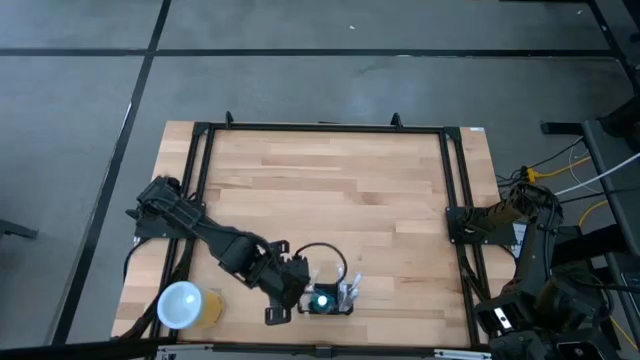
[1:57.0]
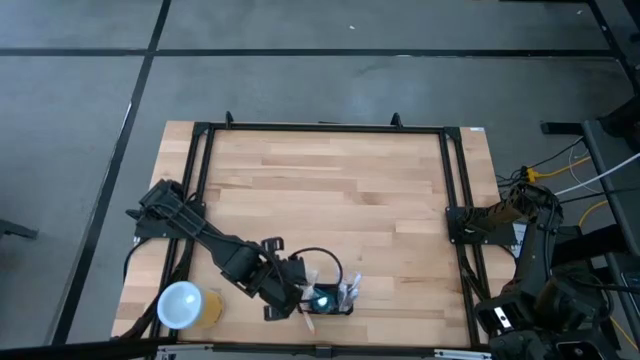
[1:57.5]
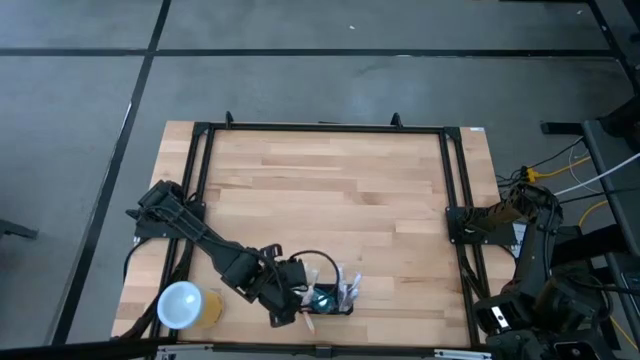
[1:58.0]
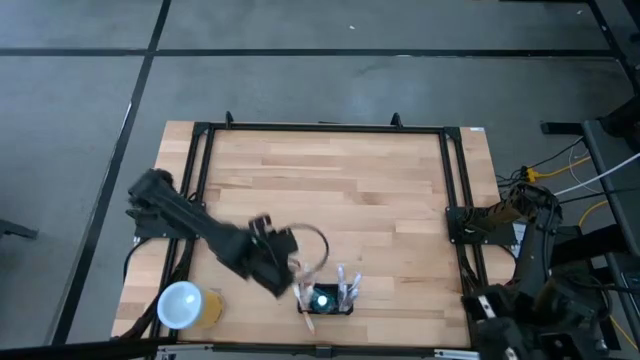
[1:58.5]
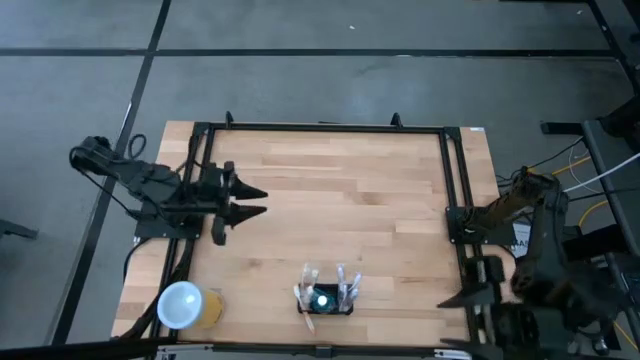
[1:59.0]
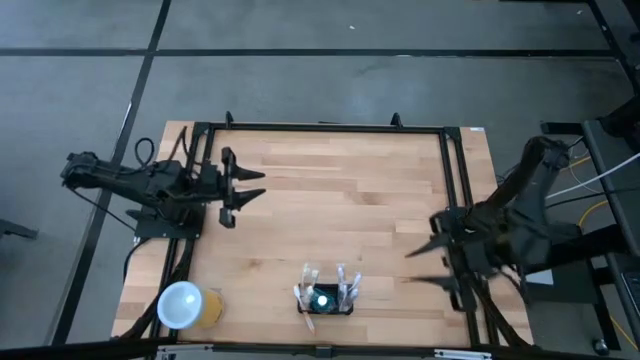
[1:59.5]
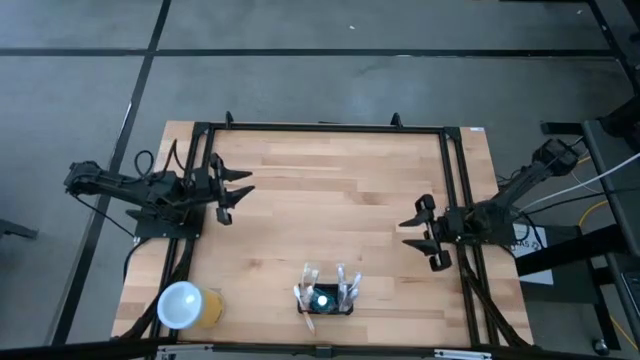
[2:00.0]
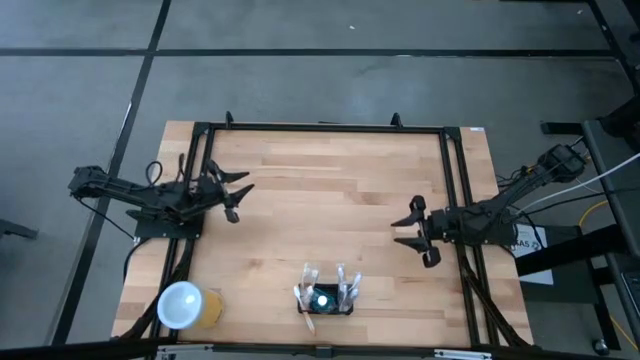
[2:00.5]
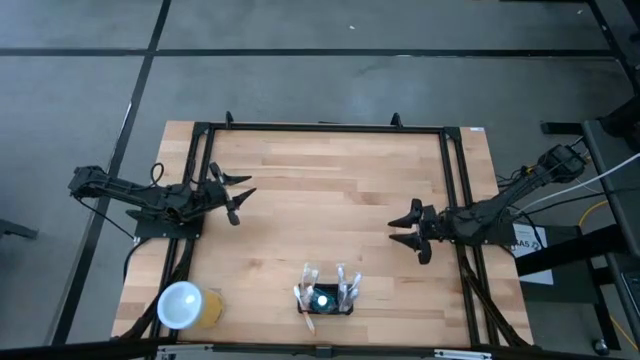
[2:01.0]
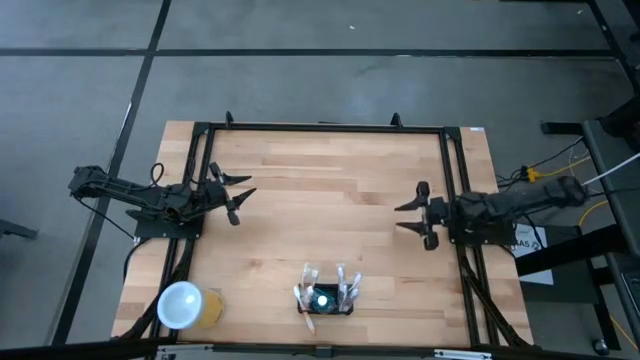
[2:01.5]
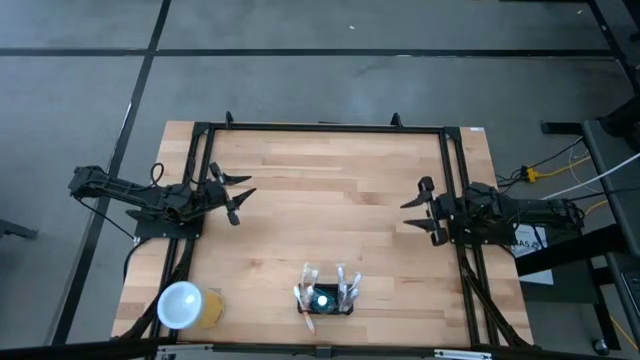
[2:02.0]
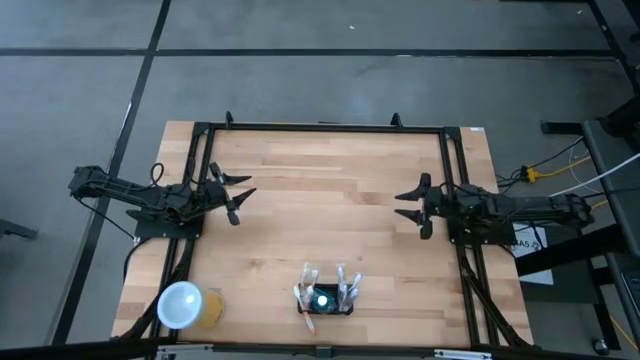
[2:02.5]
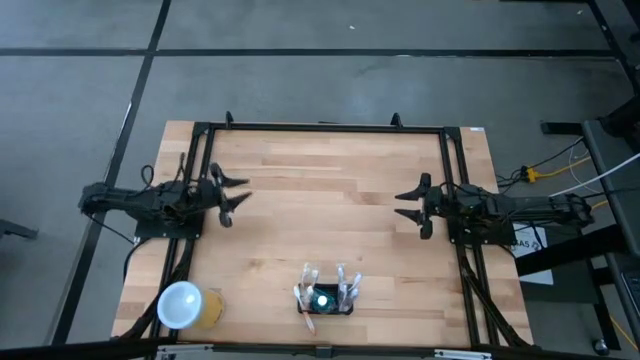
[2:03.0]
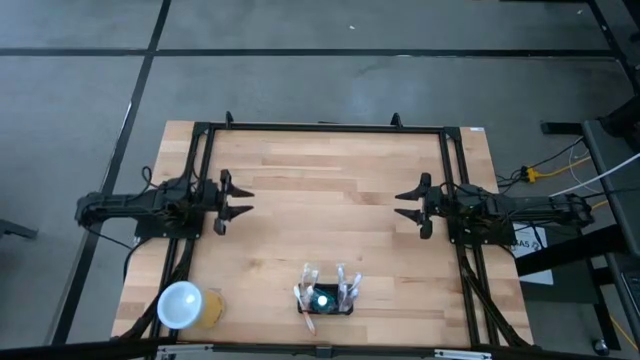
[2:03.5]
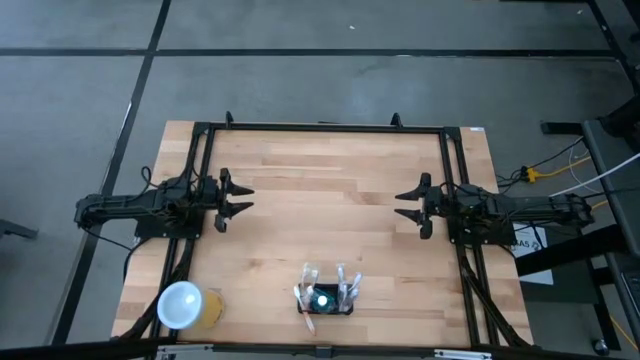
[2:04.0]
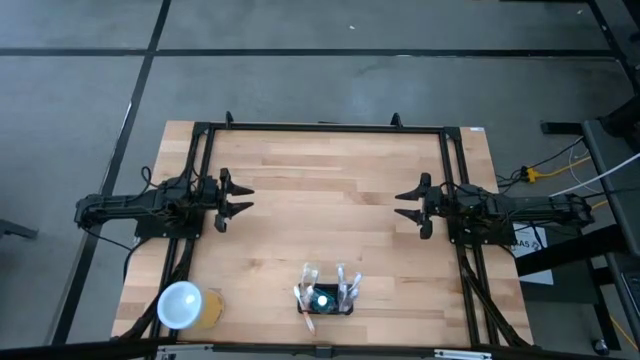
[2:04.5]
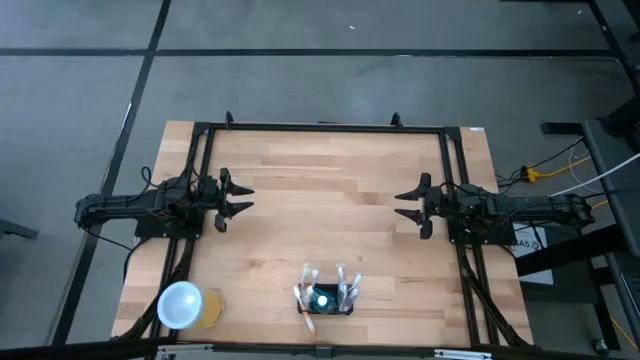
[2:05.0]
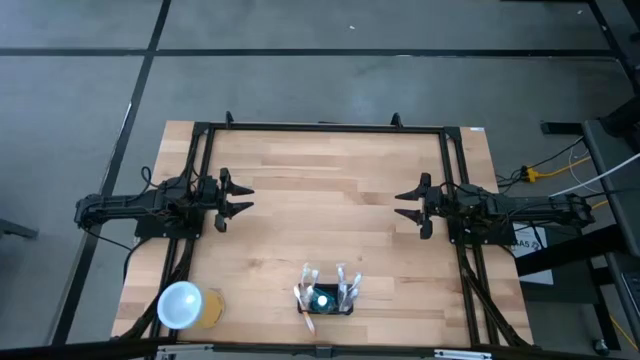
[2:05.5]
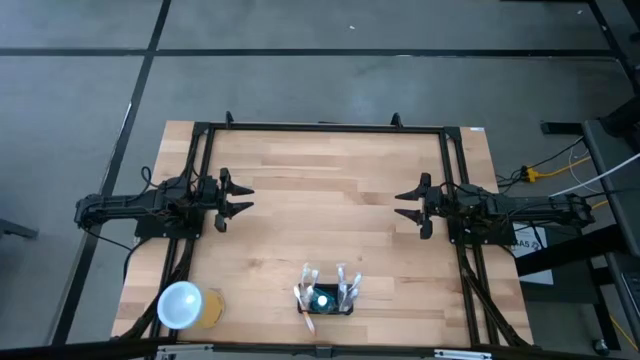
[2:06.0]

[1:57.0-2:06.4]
Task: Pick & Place toothbrushing station
Return to Home Position

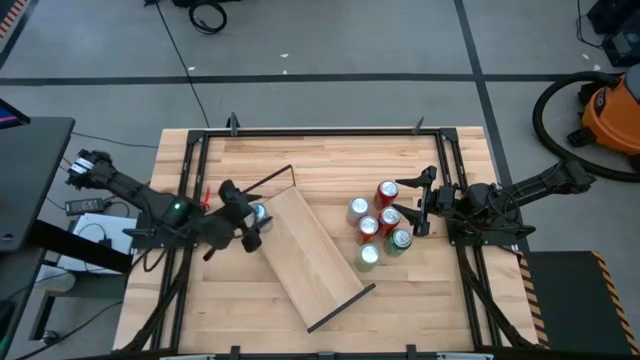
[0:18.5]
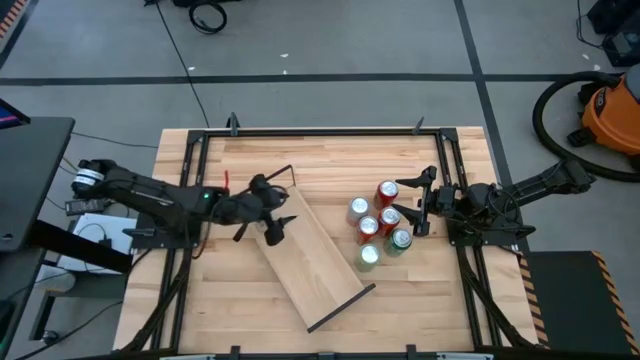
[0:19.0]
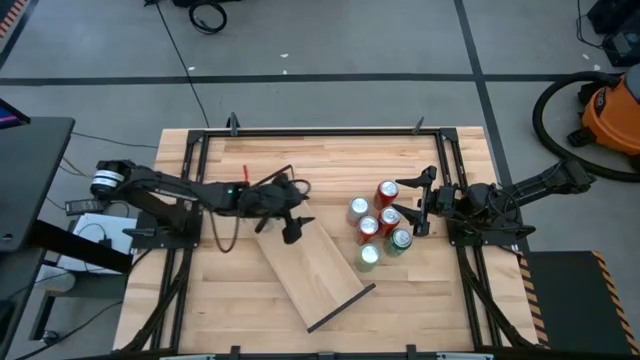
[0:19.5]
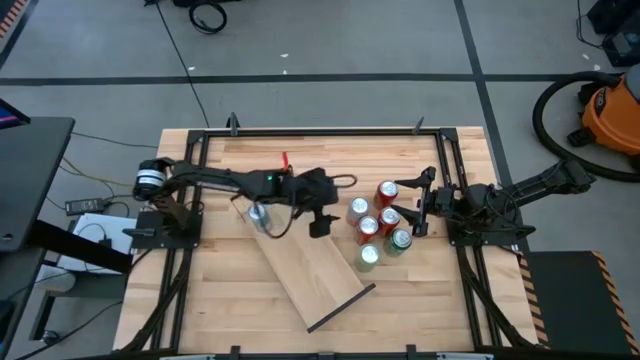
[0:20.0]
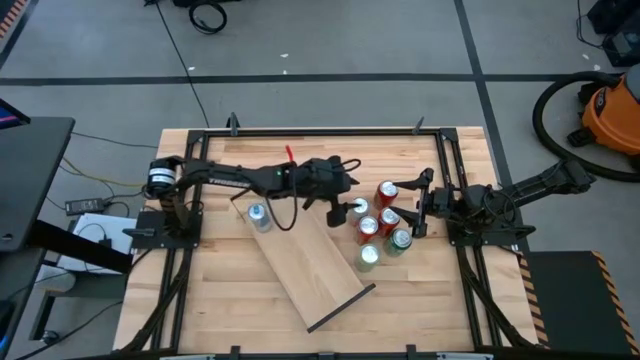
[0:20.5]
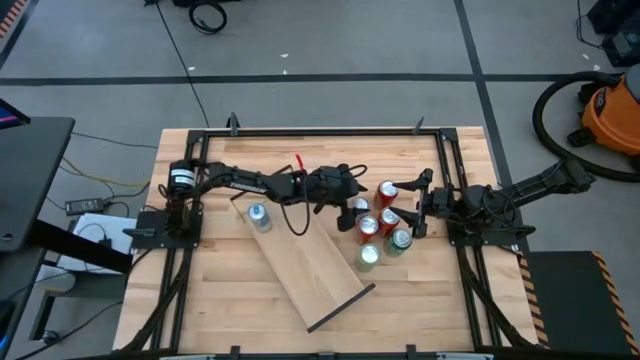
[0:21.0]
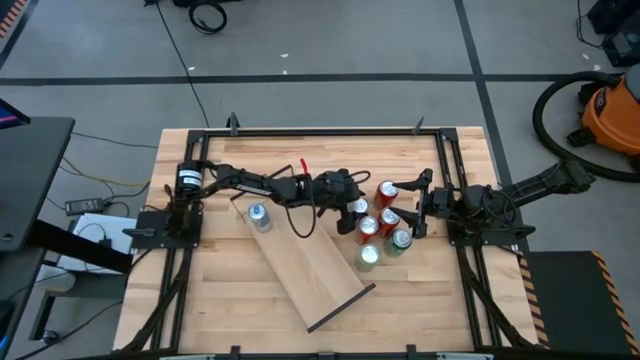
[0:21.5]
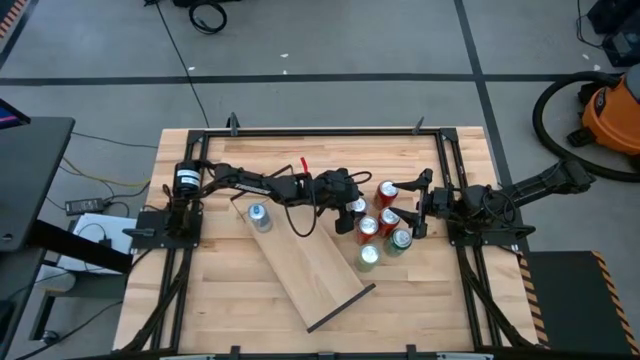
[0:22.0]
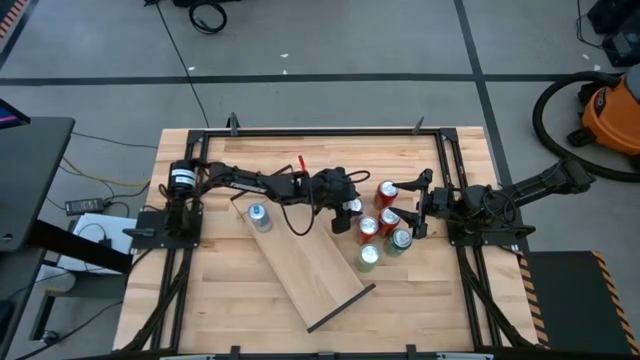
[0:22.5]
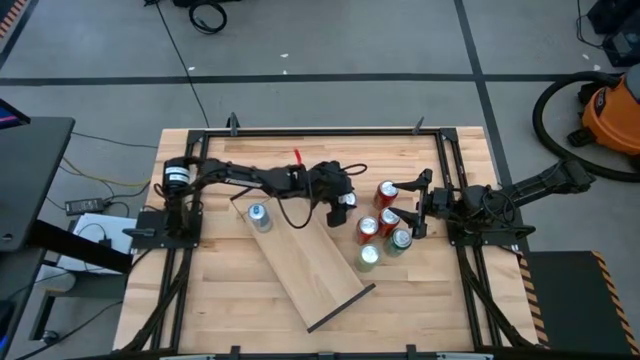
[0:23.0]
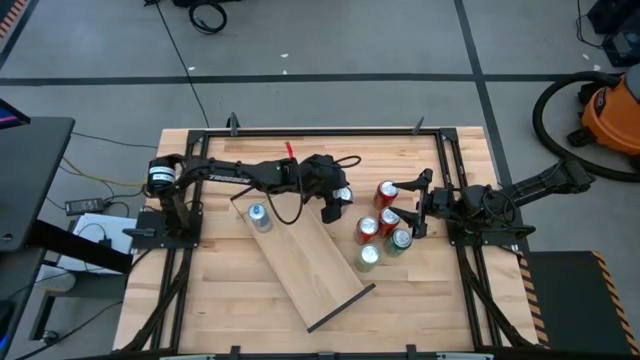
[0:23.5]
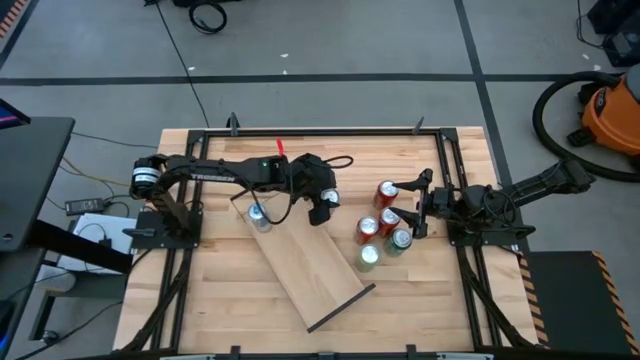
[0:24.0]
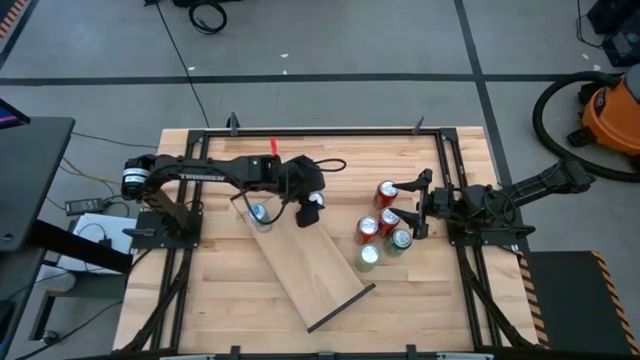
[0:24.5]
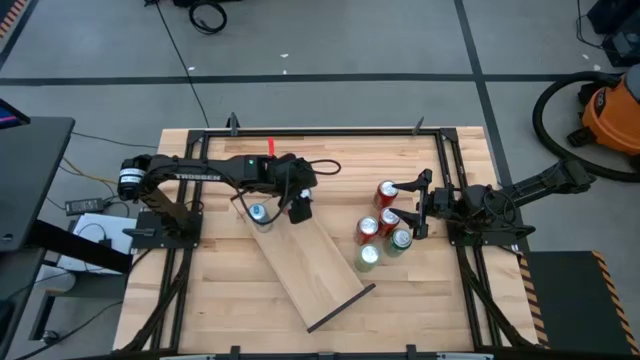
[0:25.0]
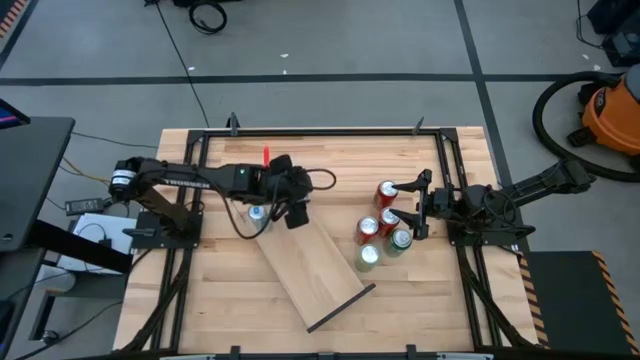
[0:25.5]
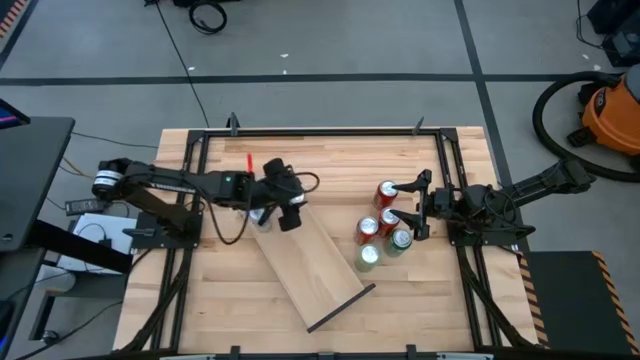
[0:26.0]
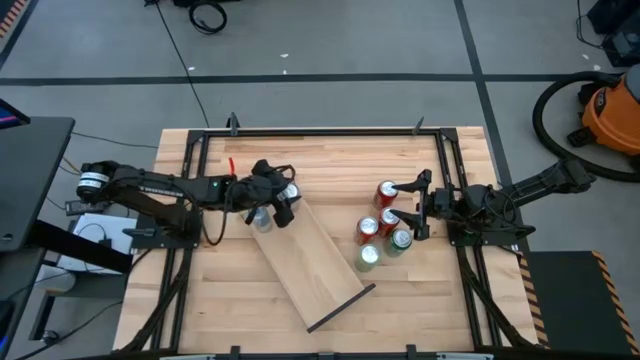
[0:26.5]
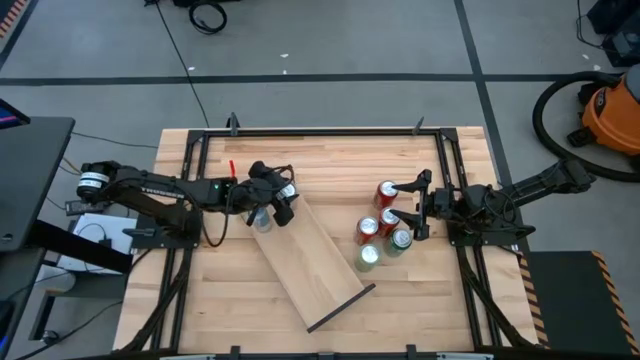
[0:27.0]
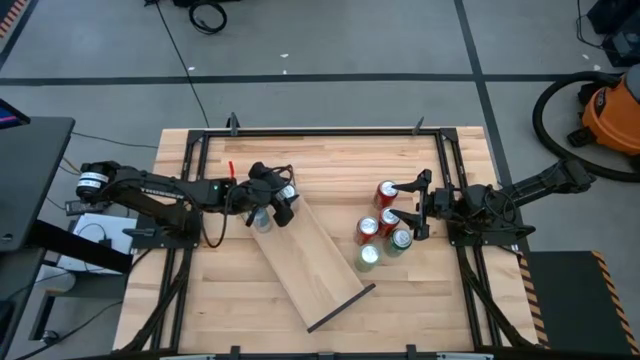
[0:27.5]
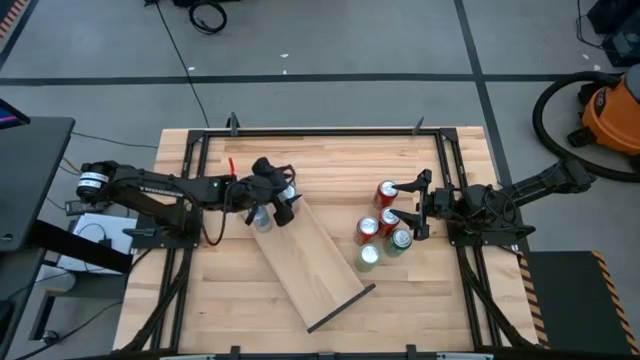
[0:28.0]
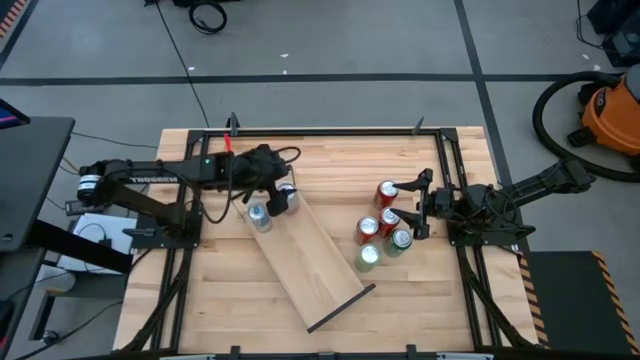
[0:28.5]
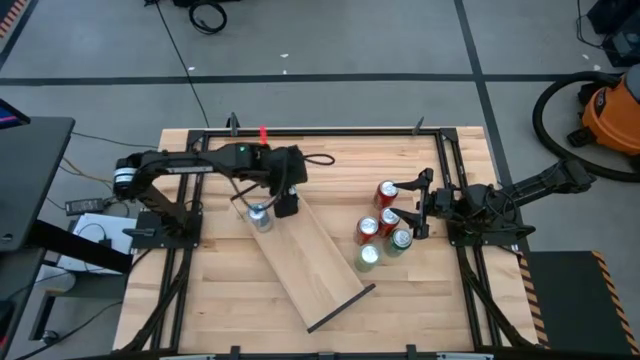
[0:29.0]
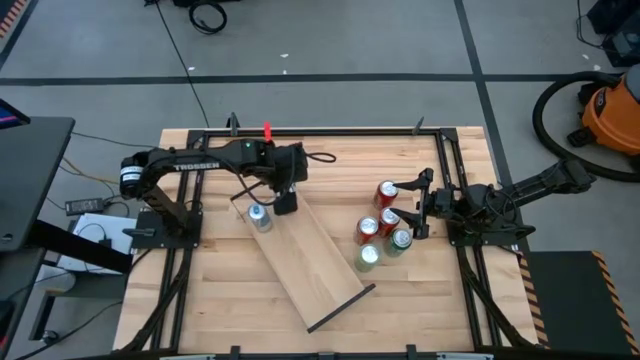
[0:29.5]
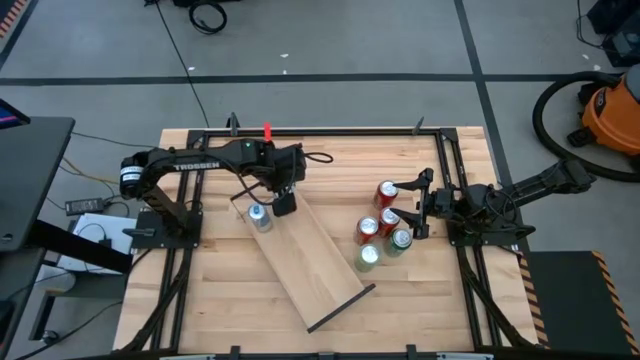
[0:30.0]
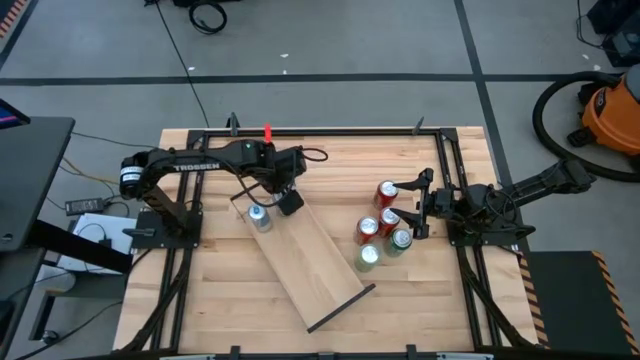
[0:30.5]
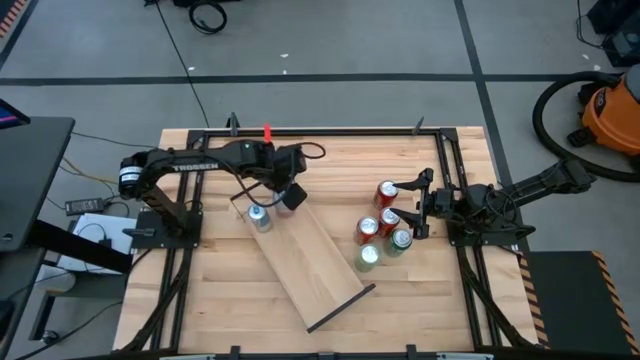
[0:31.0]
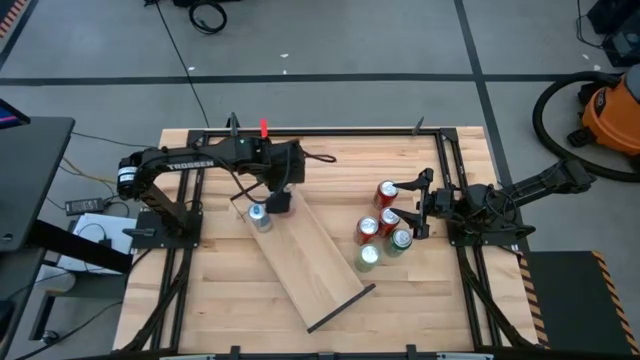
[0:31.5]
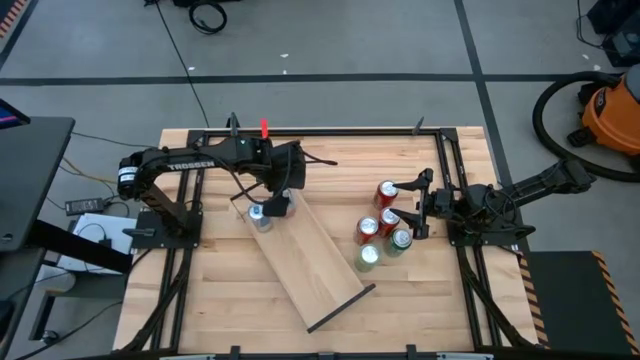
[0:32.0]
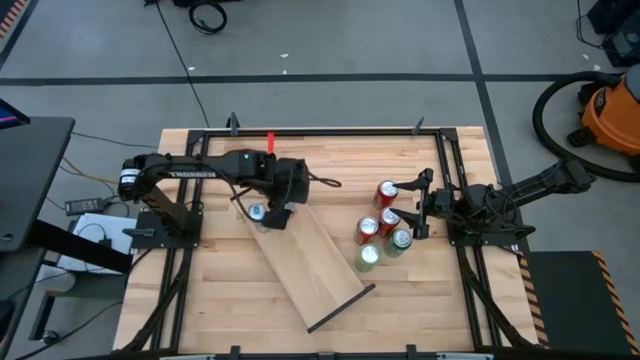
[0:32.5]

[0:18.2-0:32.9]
Task: Place canned beverage on shelf
Put the orange white soda can on the shelf
